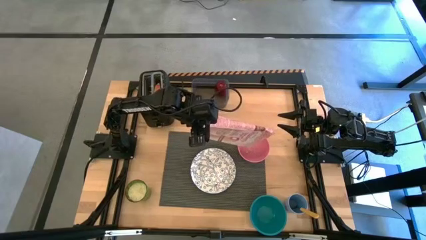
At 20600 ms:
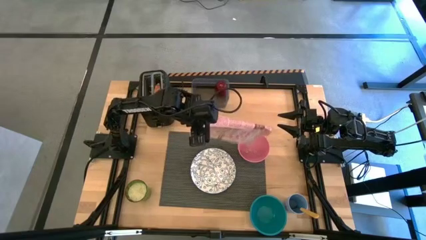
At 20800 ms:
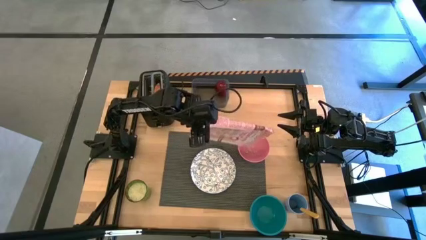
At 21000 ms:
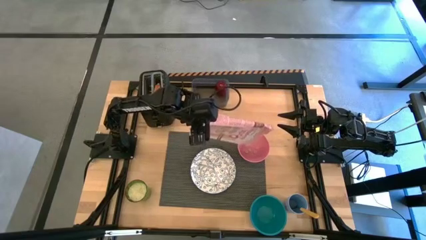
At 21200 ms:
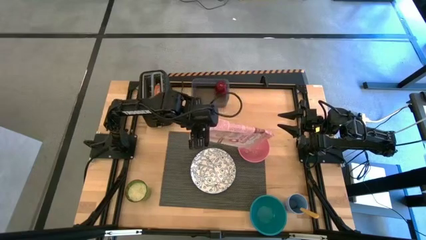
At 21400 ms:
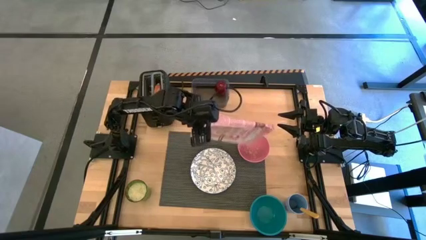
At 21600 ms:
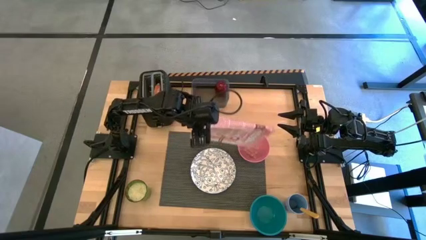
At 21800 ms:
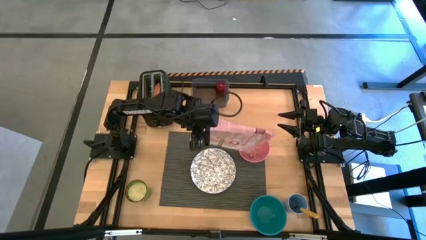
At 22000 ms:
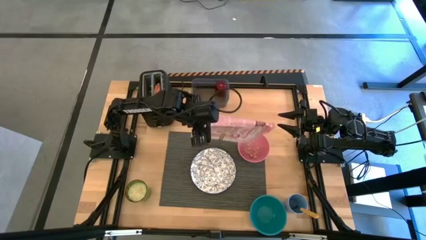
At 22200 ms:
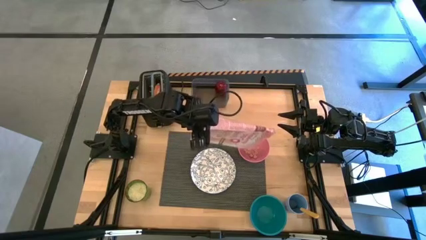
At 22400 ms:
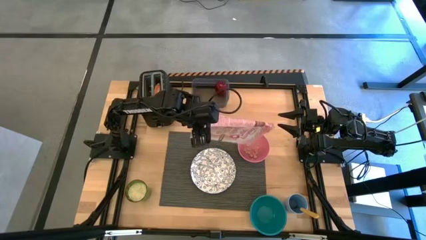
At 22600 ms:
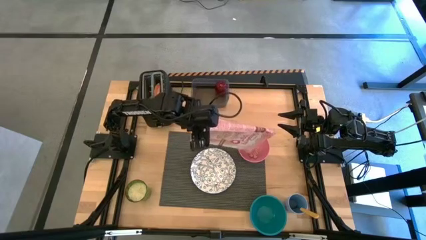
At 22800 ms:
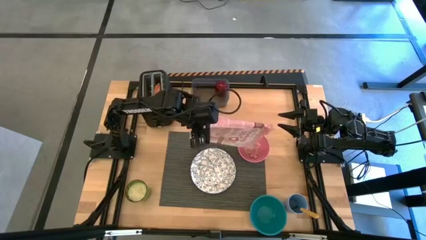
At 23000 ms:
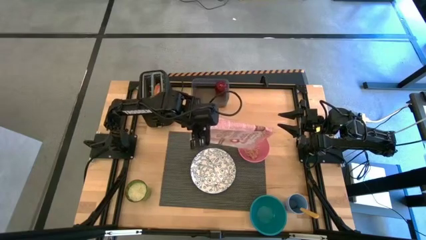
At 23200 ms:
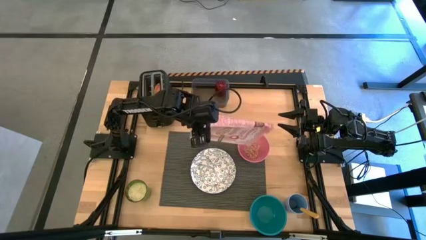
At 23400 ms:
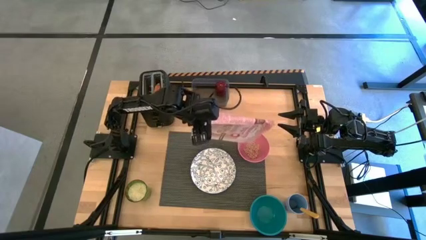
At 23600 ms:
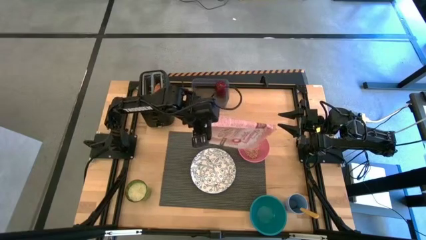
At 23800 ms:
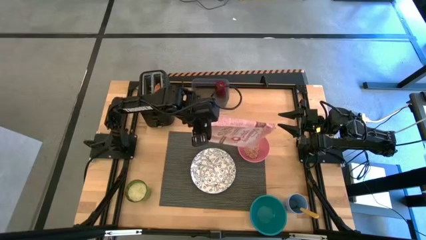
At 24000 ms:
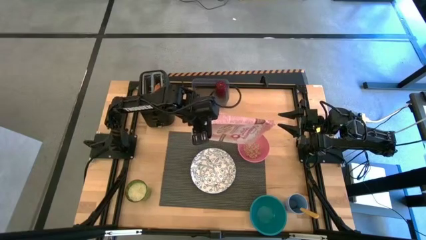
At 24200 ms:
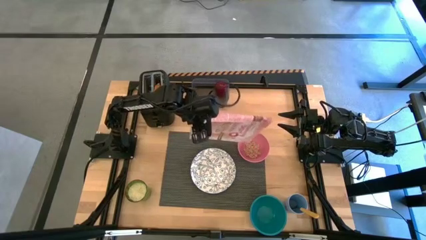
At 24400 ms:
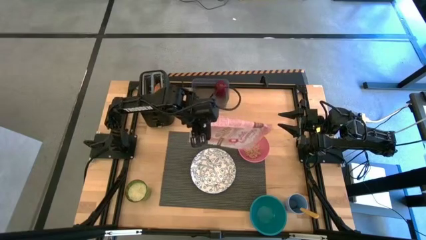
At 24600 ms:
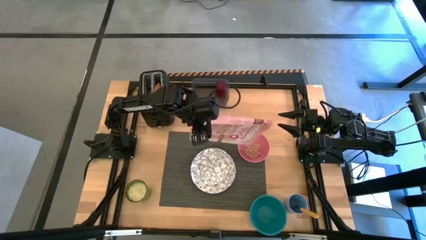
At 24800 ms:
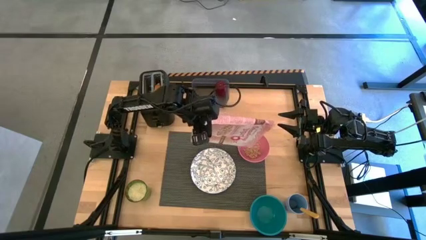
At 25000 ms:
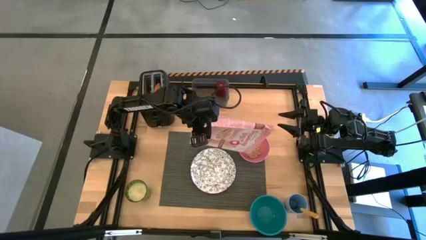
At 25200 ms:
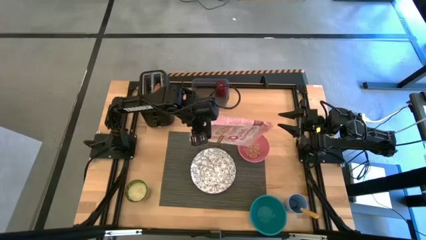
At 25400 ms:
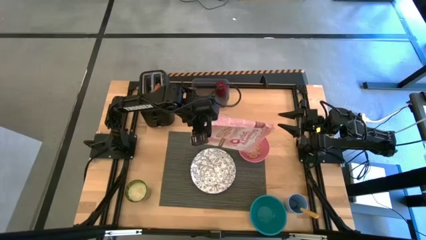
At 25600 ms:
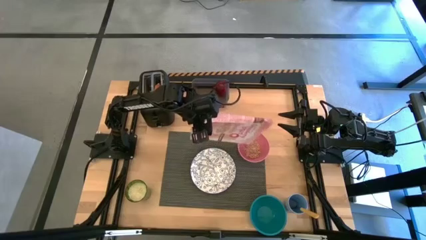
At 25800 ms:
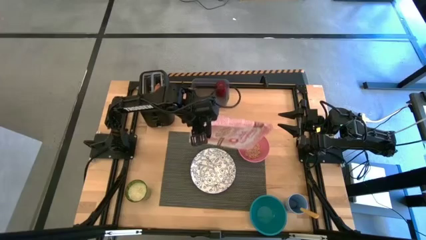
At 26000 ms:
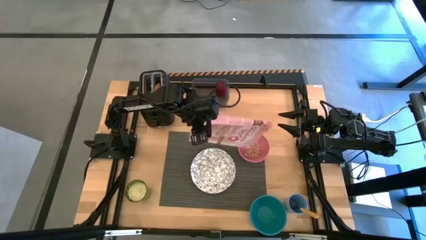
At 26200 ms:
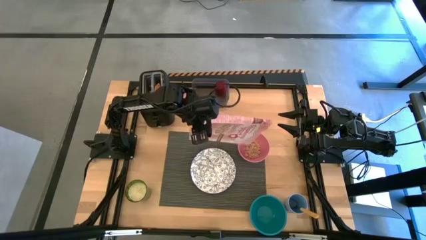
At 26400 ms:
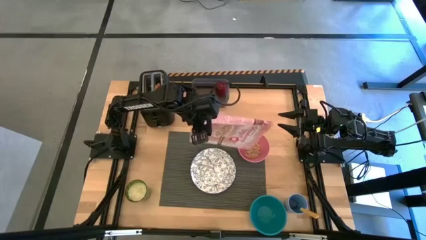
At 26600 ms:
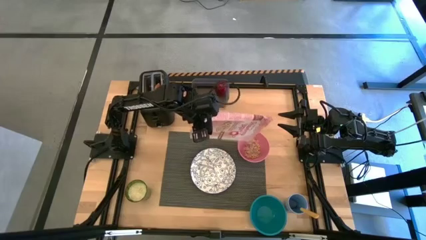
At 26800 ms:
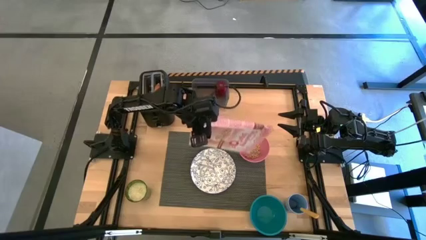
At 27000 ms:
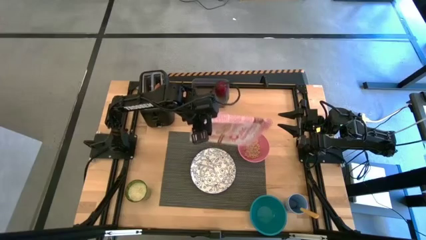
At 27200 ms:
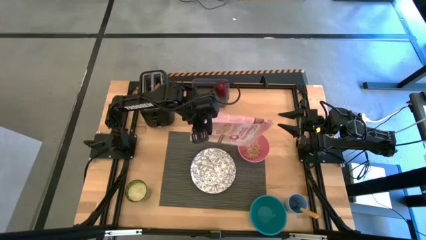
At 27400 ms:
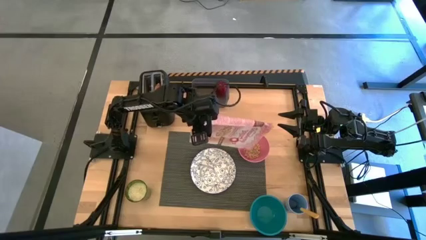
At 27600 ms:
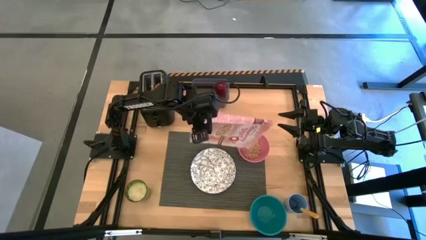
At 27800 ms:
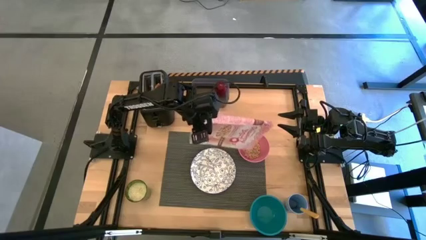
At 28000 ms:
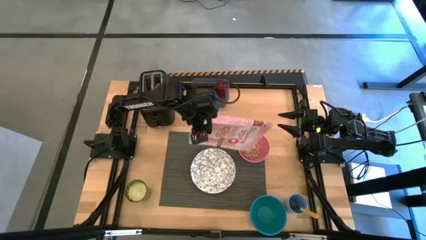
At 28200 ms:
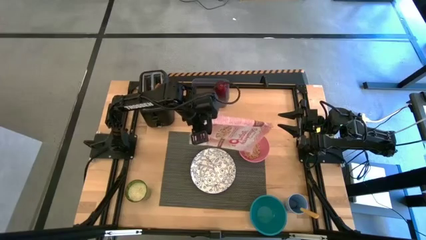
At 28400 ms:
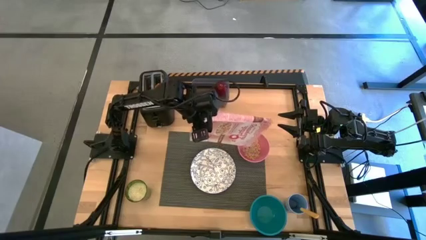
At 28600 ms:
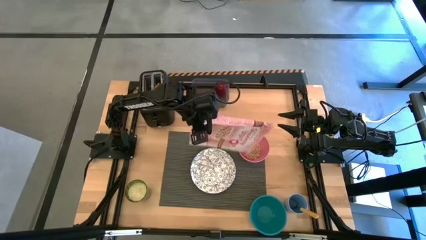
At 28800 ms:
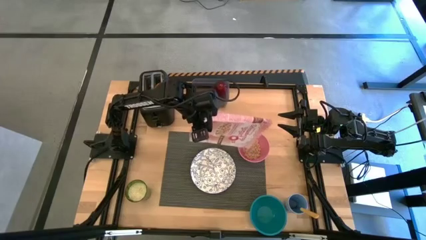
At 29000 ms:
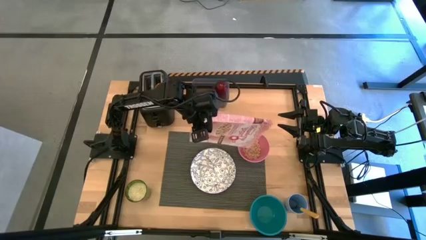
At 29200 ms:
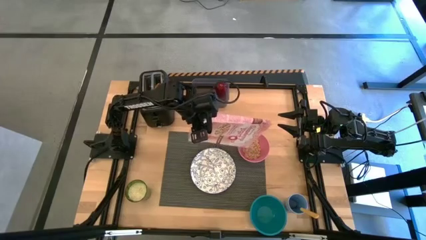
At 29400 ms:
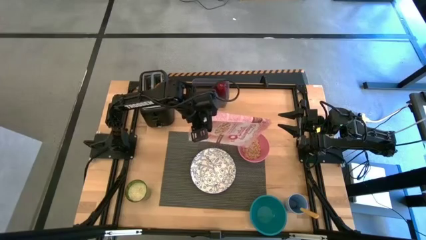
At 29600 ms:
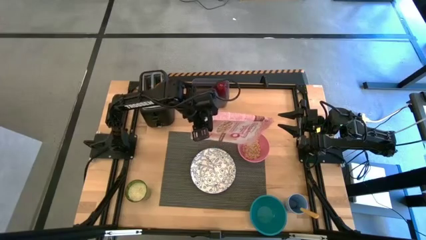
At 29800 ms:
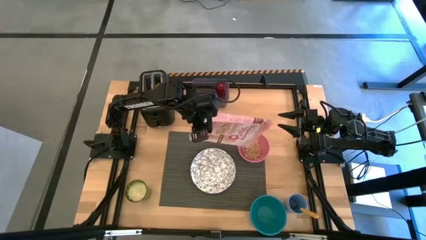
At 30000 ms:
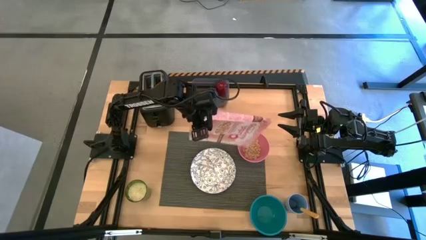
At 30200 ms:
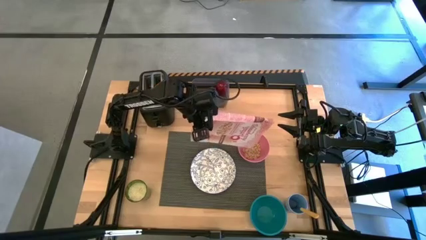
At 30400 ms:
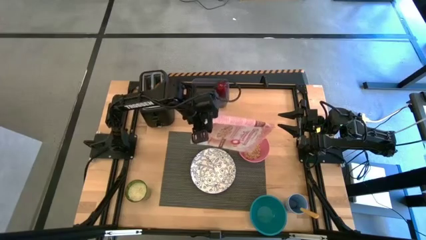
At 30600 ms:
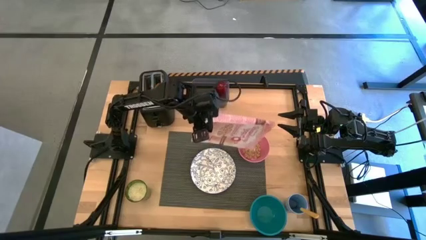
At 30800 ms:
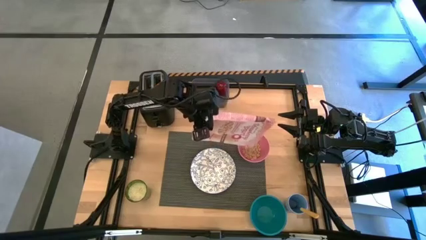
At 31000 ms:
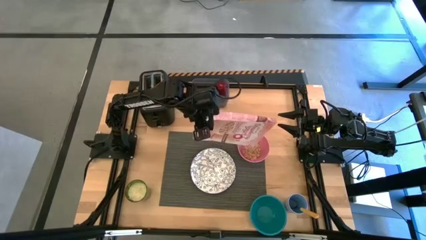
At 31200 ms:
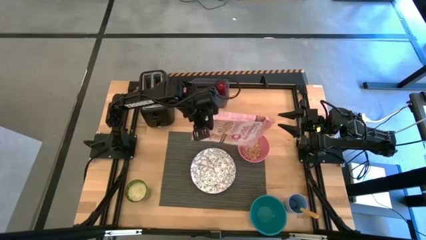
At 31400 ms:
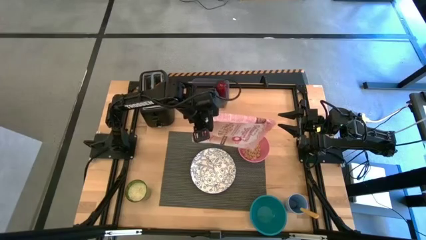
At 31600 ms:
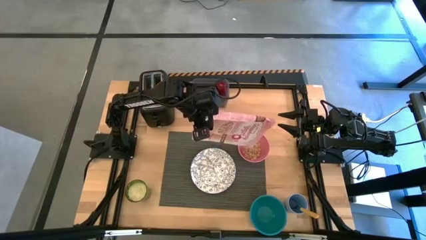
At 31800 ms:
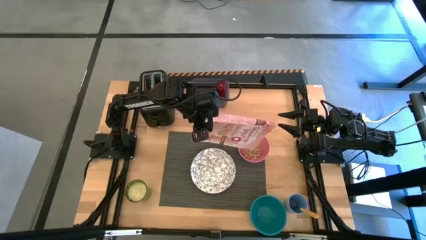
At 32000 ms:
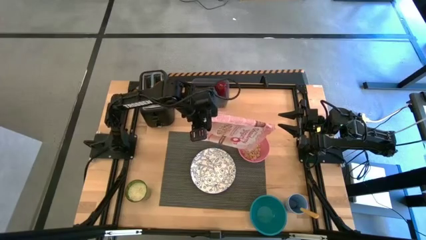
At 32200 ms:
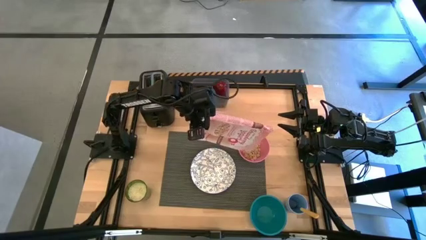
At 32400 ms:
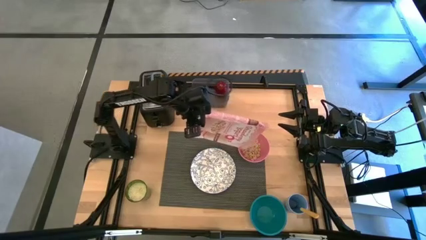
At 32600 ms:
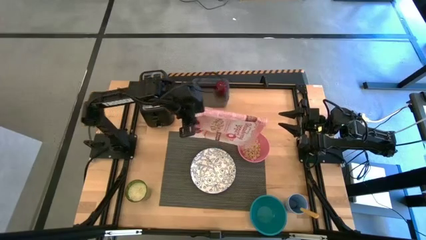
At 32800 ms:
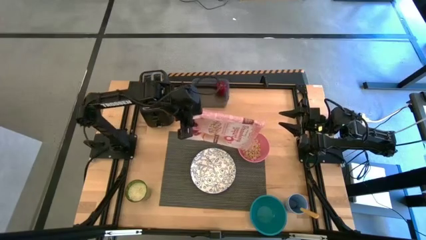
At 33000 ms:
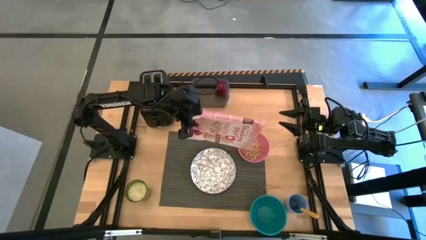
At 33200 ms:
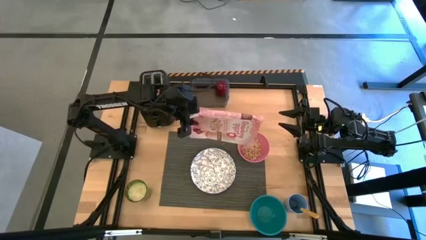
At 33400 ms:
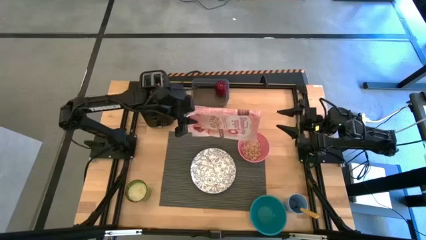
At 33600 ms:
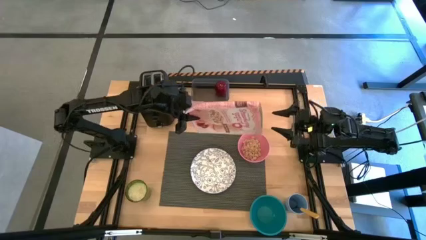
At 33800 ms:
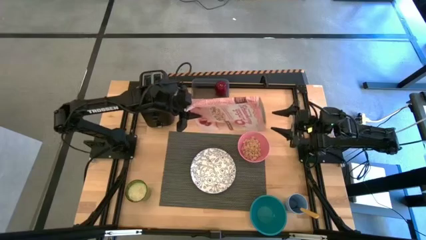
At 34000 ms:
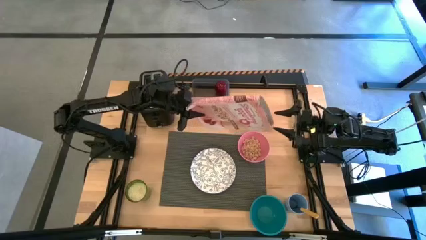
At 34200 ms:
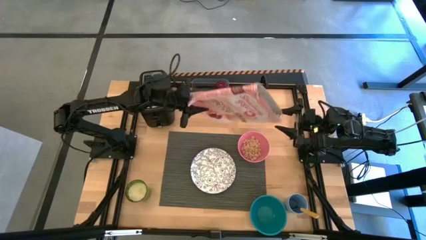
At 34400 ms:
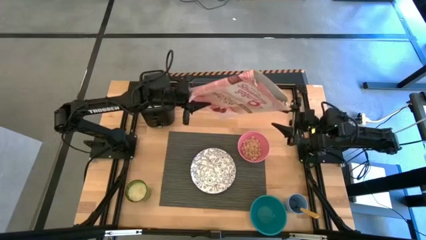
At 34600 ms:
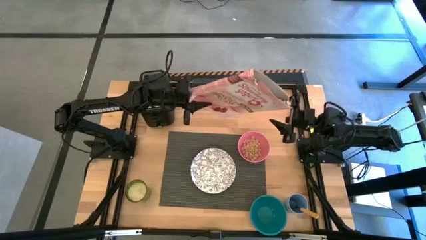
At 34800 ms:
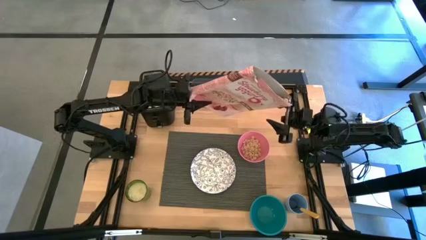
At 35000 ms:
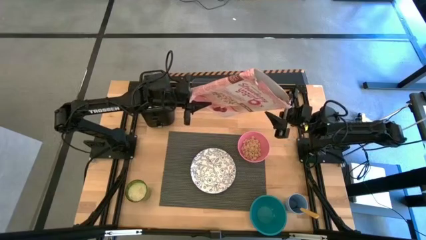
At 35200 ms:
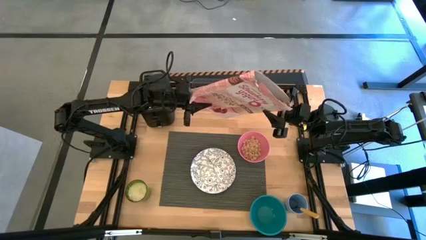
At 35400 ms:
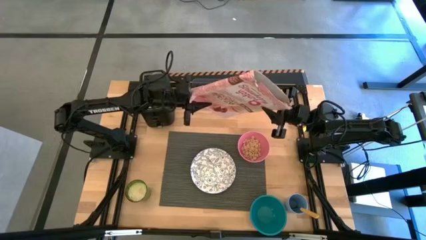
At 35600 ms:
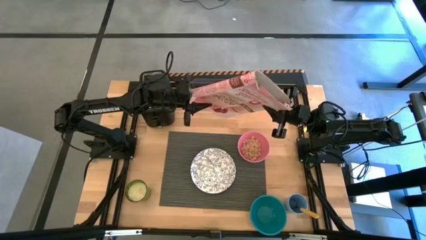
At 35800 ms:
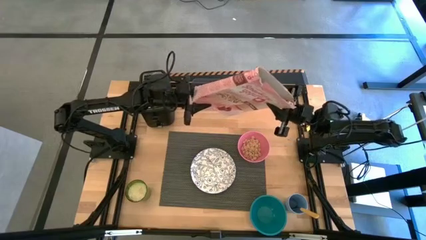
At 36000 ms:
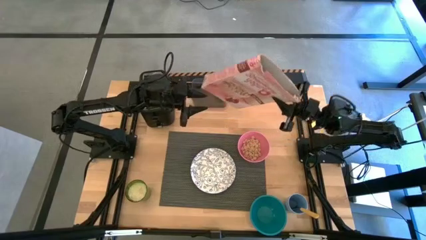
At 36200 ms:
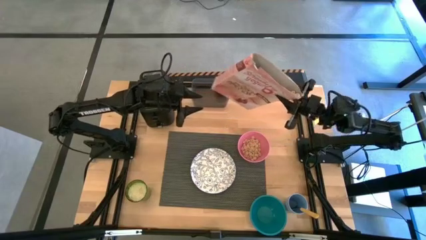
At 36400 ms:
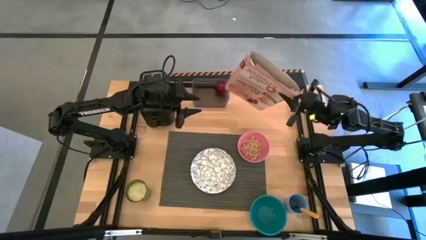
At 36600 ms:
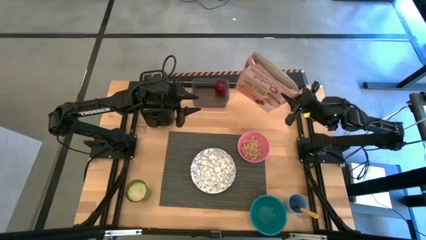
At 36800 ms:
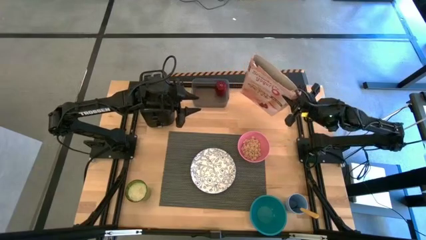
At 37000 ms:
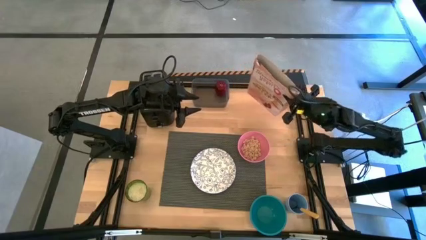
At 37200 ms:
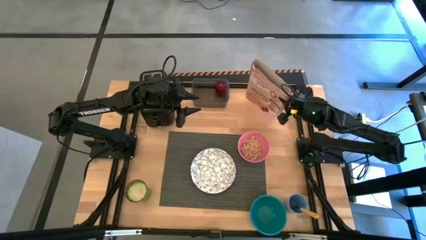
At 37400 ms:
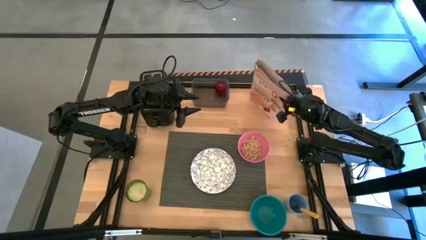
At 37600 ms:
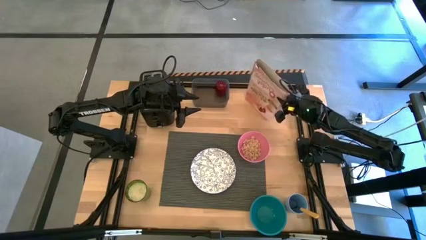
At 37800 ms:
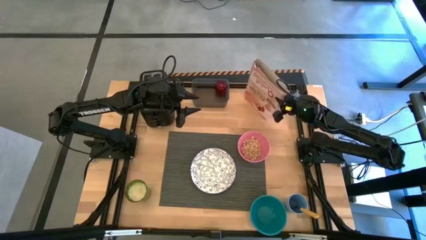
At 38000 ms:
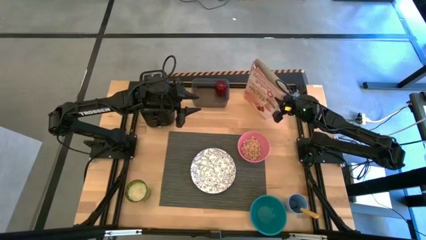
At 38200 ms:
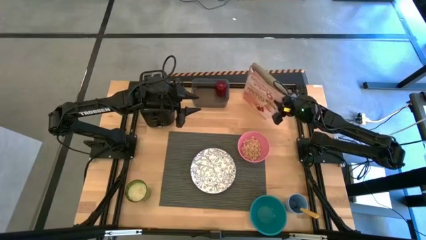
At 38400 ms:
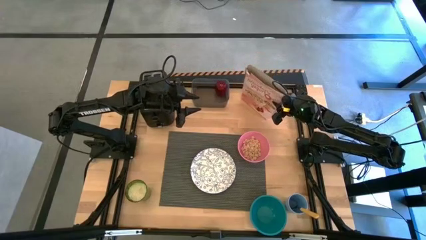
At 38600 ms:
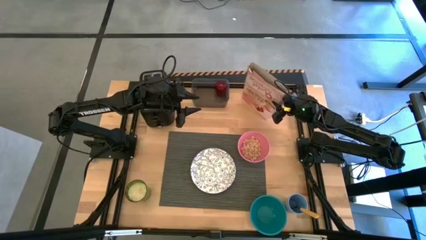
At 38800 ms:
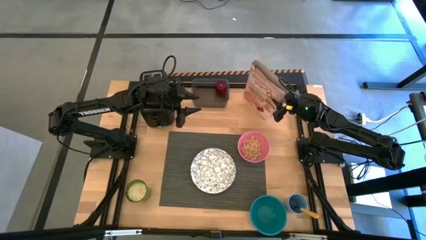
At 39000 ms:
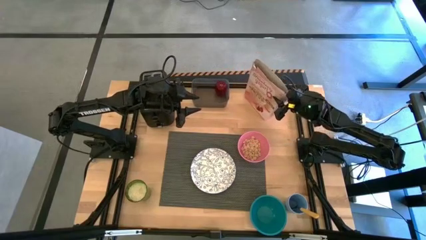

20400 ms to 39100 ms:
Task: Arrange a breakfast setting
Pour the cereal box into the pink bowl
